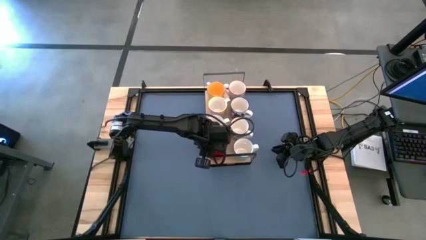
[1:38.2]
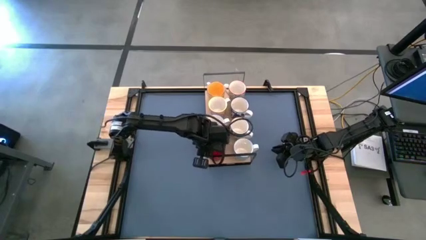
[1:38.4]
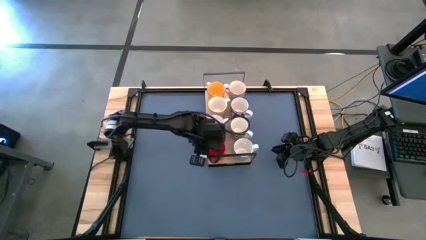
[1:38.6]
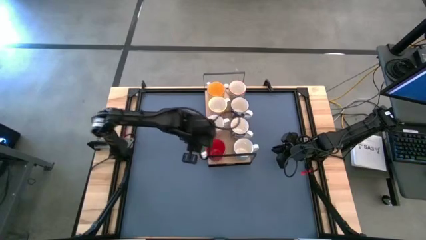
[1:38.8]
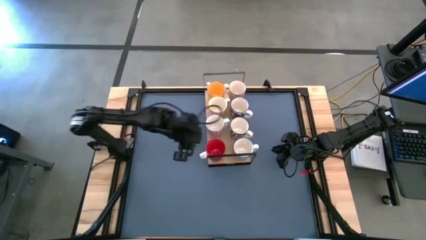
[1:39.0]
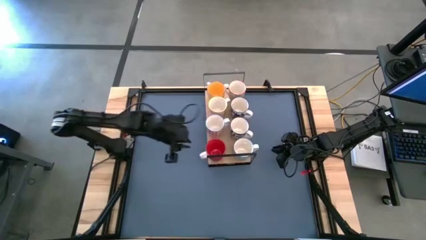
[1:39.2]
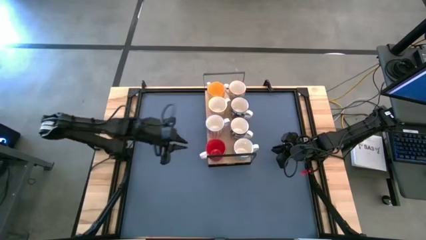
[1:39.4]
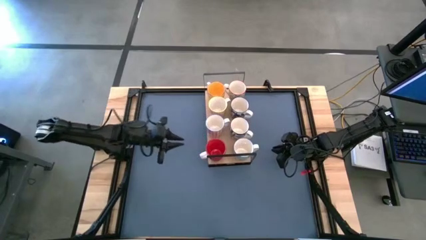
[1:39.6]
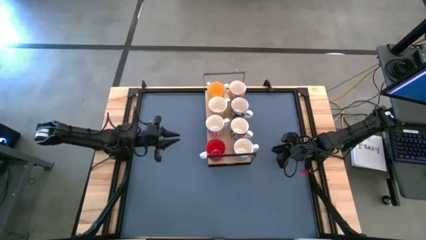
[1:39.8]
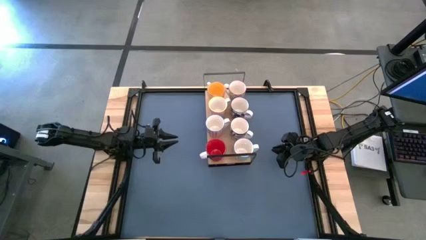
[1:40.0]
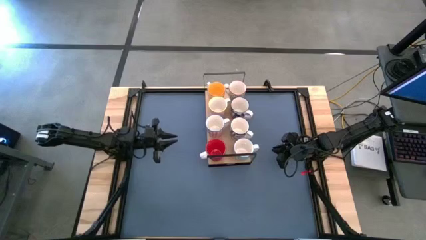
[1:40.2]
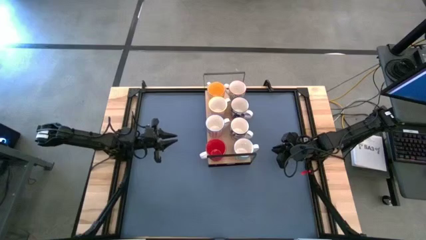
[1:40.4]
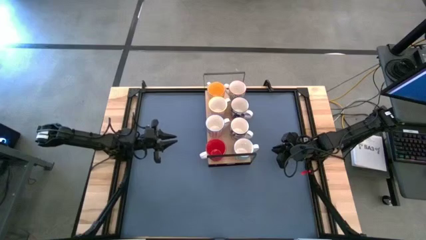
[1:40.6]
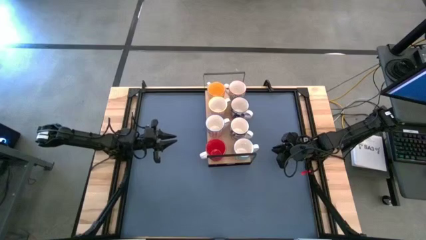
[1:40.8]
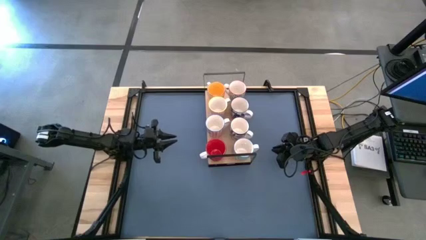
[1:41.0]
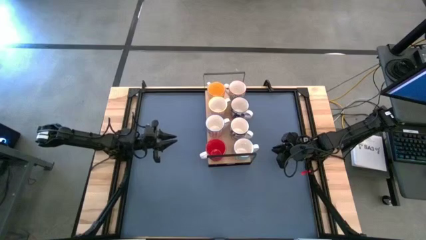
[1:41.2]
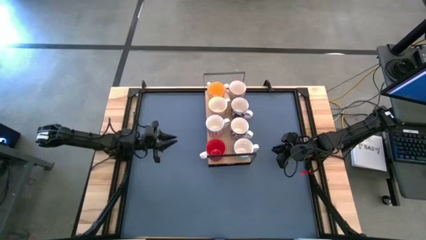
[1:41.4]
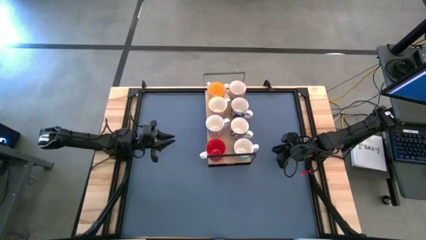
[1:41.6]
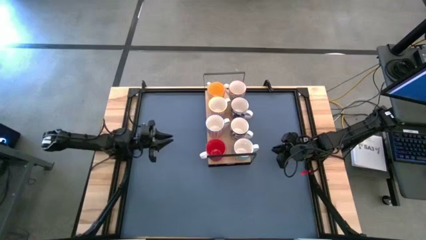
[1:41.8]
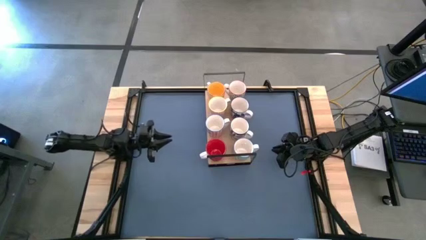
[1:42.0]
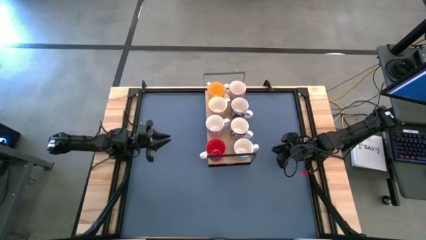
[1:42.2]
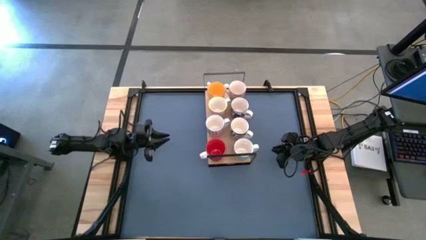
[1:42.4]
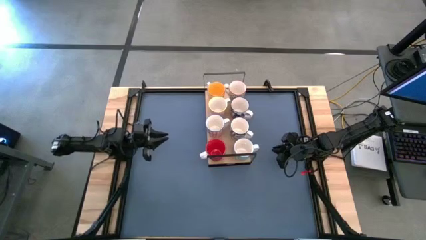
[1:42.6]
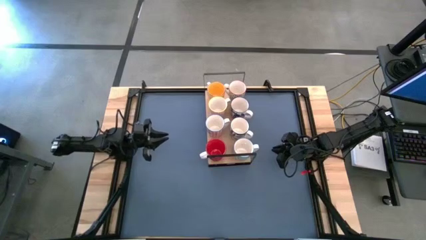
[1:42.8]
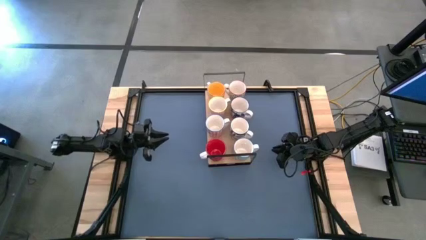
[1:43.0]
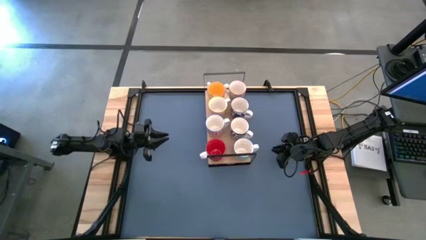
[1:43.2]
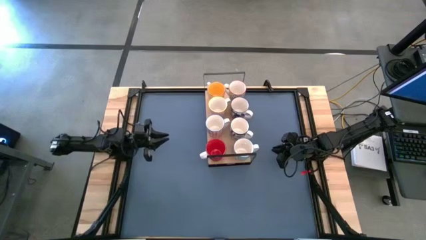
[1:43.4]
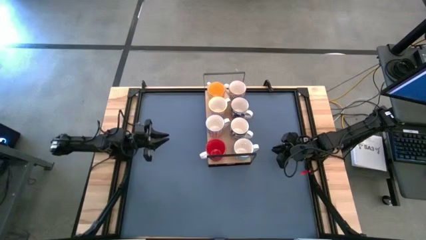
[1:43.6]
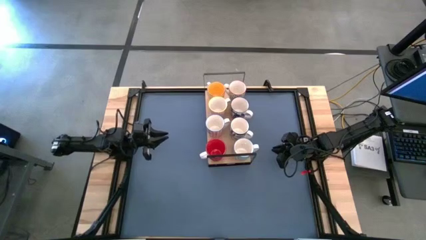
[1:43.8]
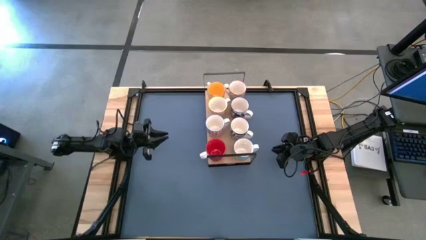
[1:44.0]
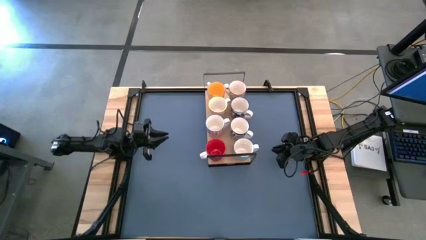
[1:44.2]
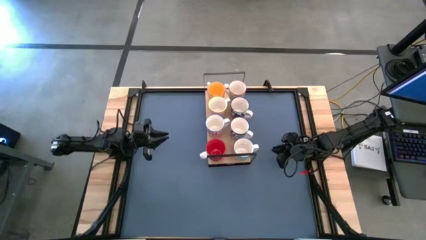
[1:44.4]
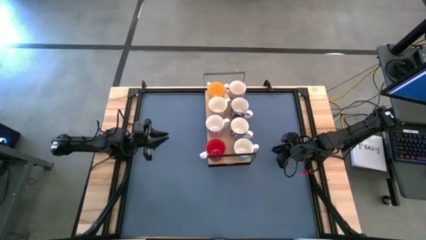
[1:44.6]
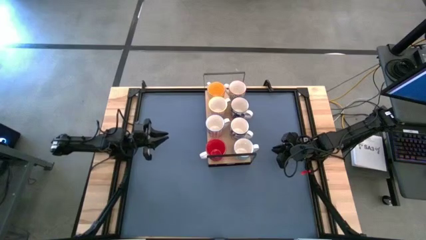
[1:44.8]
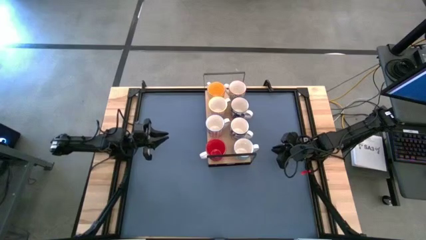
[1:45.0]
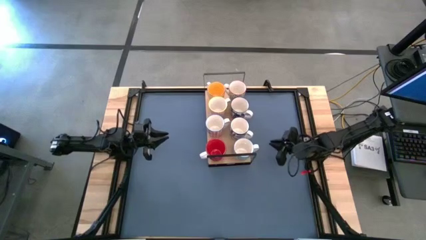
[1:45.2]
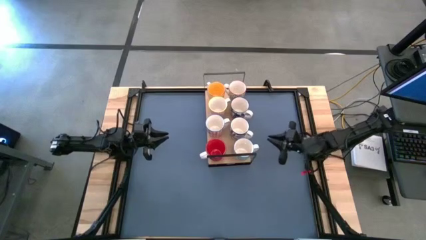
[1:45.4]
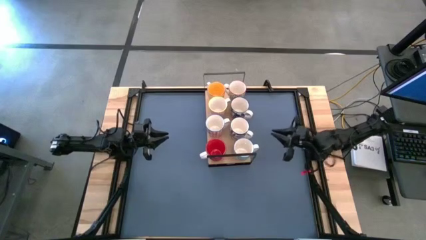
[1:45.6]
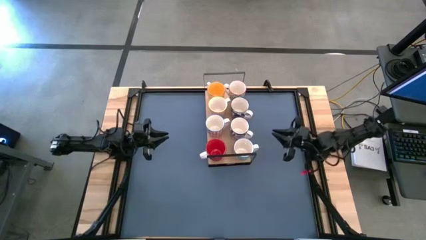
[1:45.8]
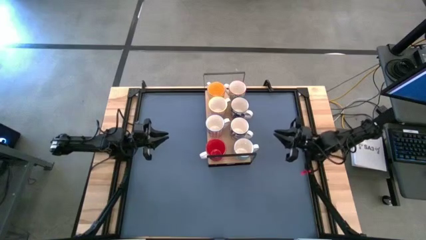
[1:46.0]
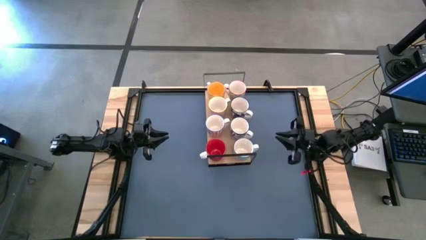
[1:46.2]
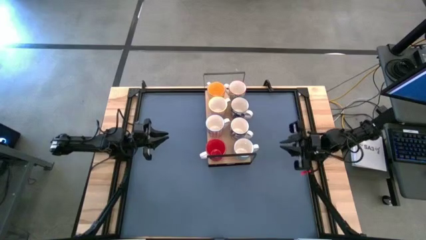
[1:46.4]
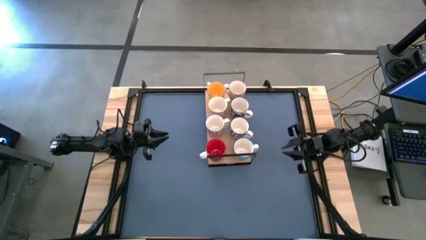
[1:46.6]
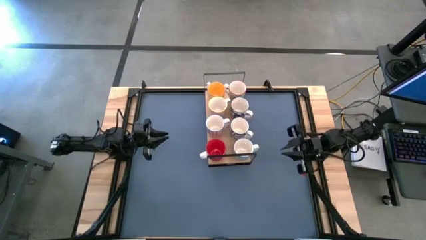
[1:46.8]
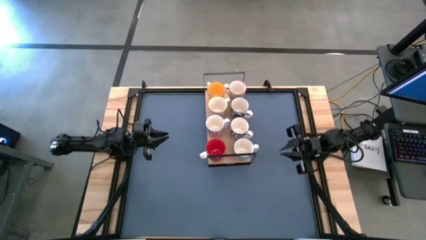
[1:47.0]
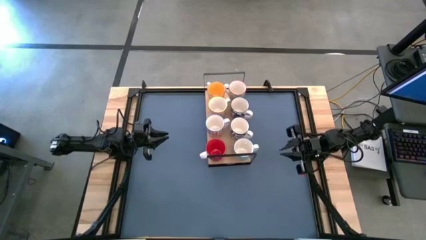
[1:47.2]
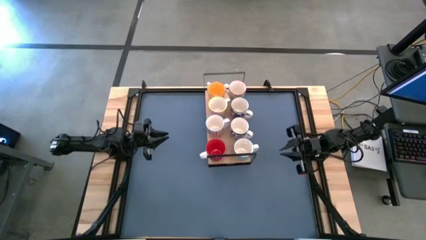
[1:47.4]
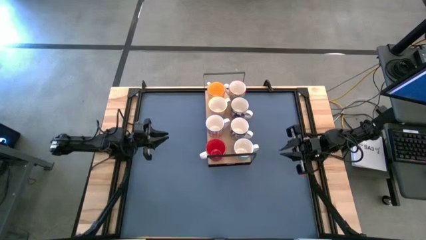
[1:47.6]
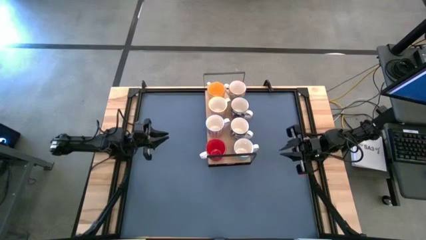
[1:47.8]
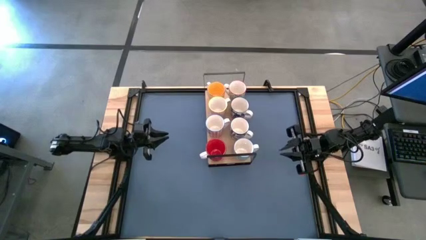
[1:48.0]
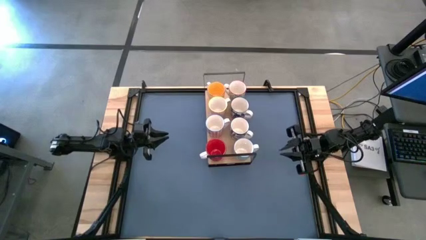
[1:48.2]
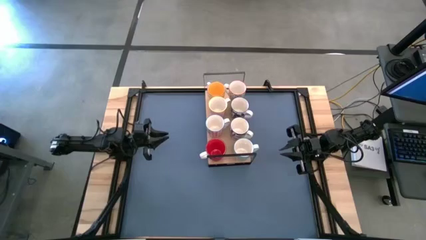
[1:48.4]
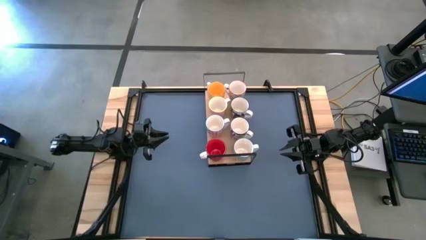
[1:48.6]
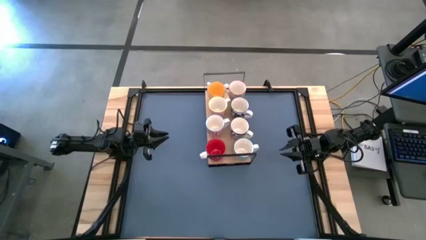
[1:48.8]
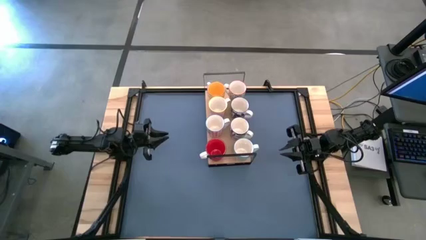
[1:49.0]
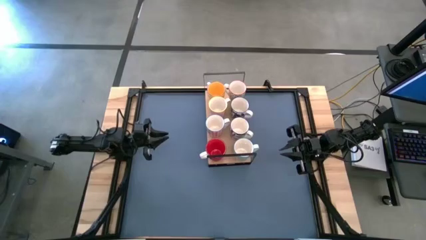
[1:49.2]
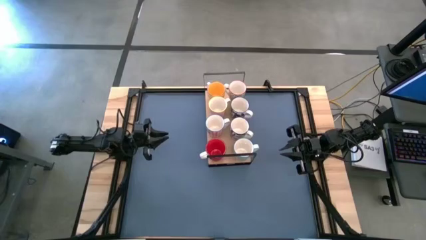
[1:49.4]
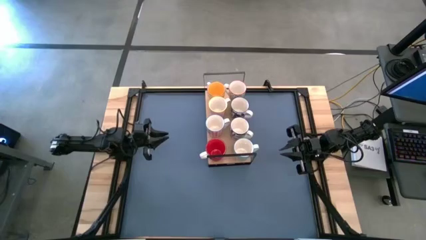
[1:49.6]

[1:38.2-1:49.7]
Task: Place coffee mugs
Return to Home Position
